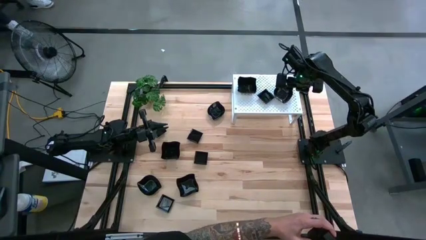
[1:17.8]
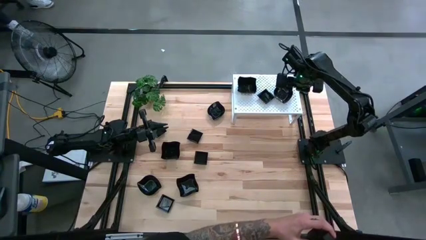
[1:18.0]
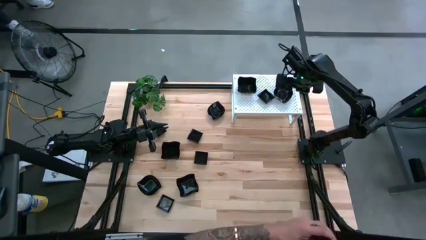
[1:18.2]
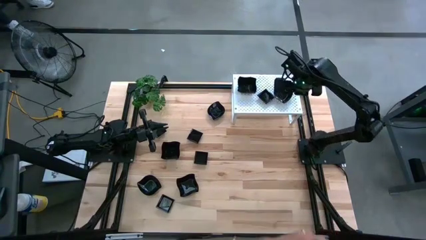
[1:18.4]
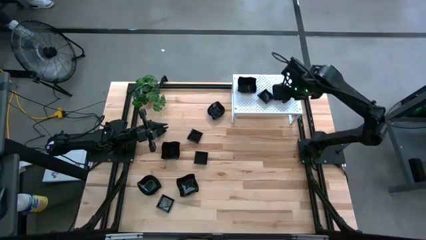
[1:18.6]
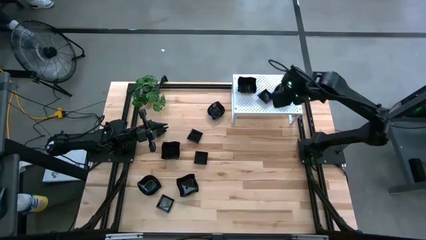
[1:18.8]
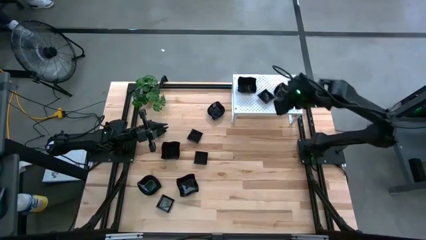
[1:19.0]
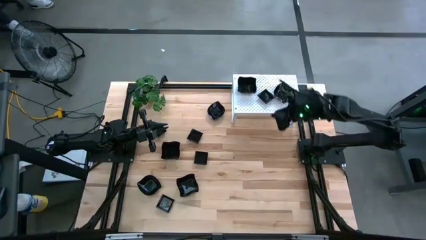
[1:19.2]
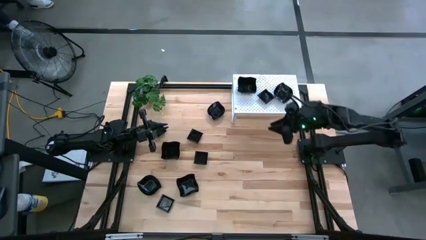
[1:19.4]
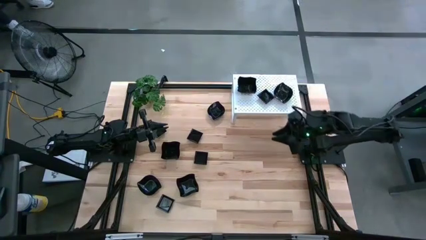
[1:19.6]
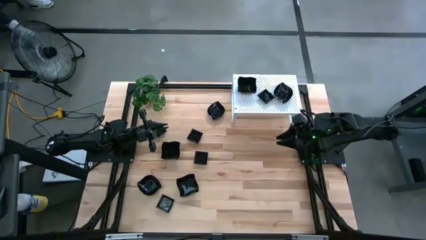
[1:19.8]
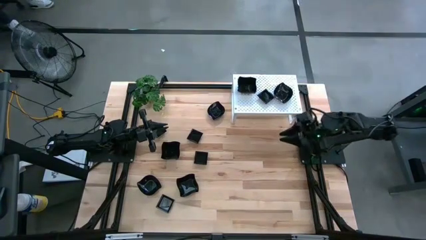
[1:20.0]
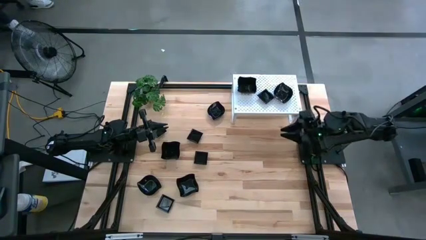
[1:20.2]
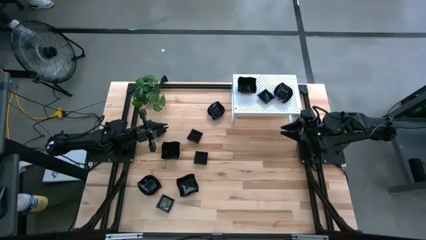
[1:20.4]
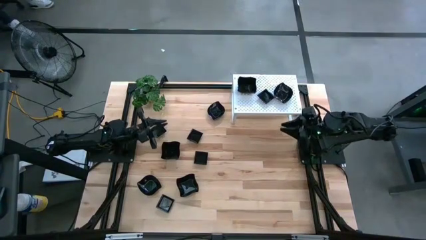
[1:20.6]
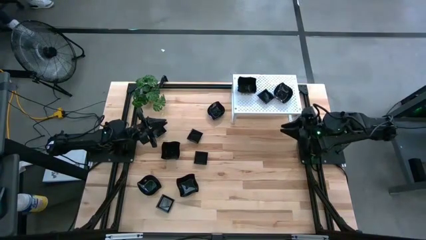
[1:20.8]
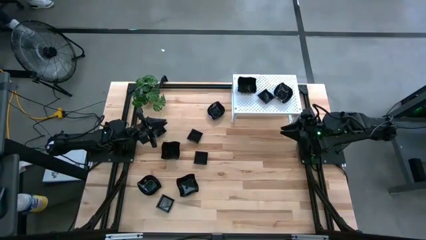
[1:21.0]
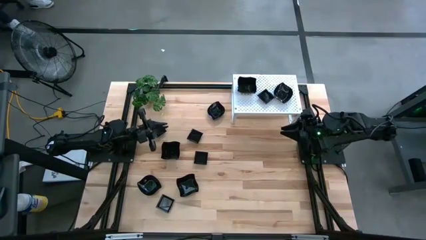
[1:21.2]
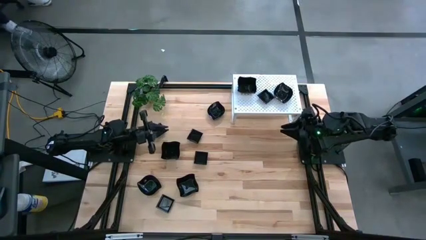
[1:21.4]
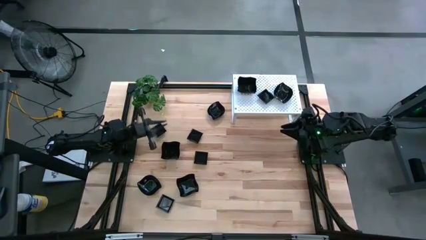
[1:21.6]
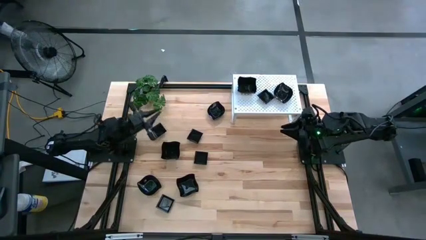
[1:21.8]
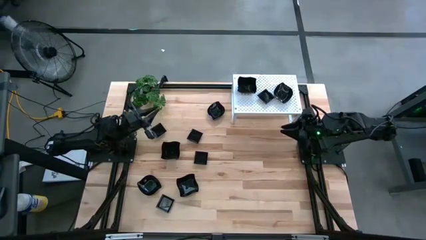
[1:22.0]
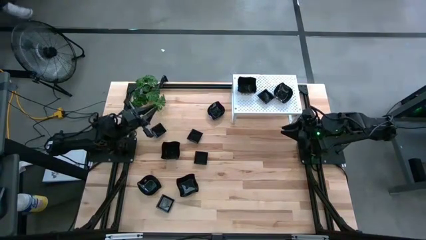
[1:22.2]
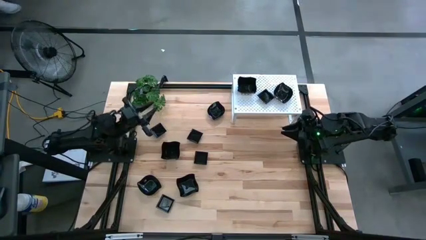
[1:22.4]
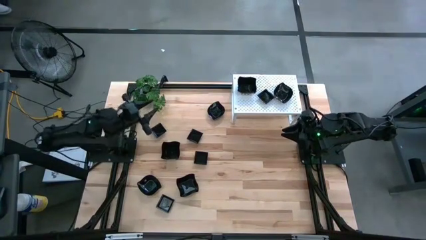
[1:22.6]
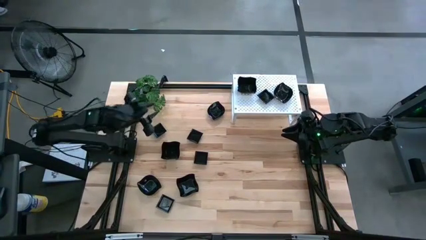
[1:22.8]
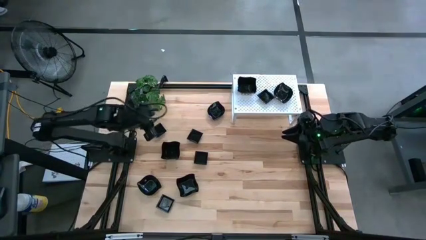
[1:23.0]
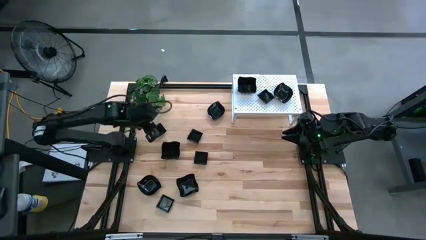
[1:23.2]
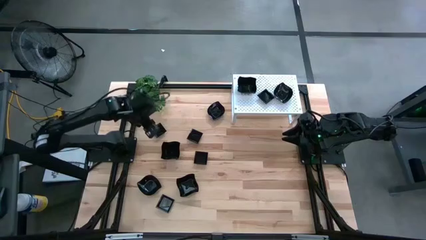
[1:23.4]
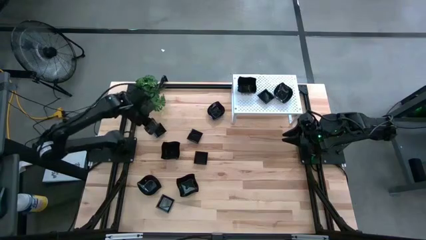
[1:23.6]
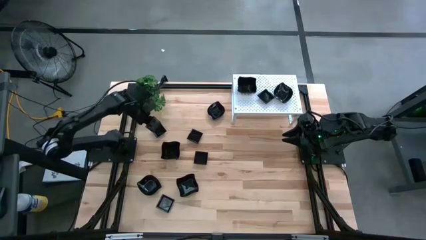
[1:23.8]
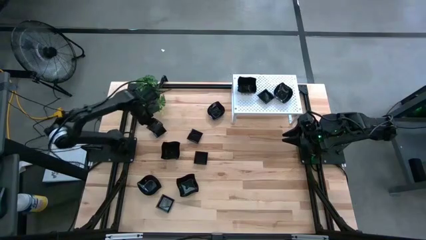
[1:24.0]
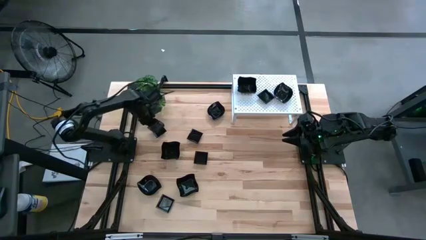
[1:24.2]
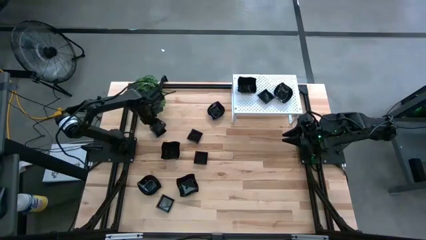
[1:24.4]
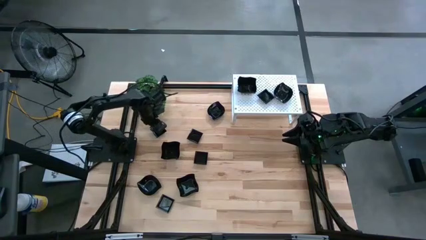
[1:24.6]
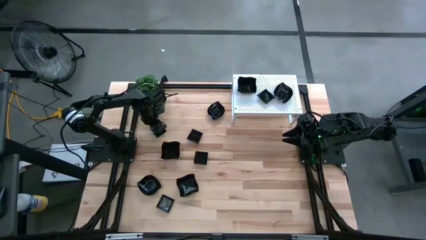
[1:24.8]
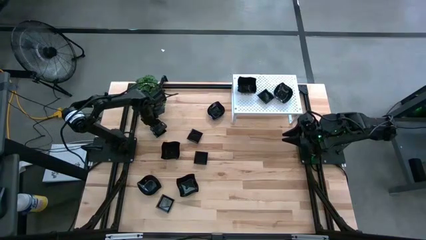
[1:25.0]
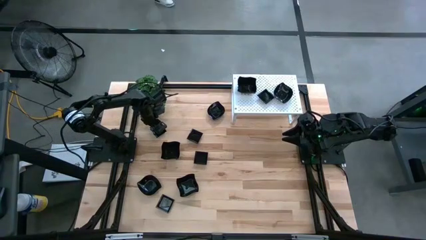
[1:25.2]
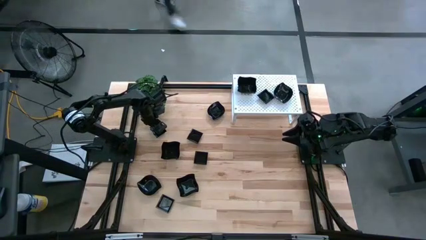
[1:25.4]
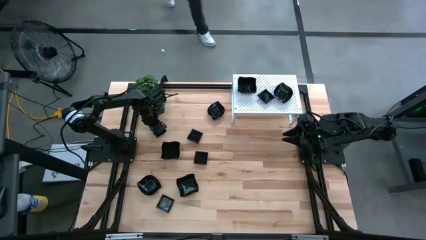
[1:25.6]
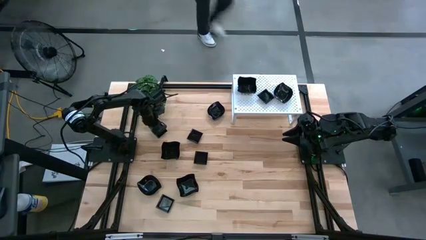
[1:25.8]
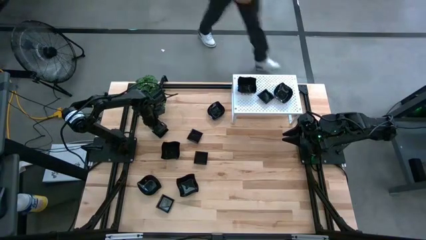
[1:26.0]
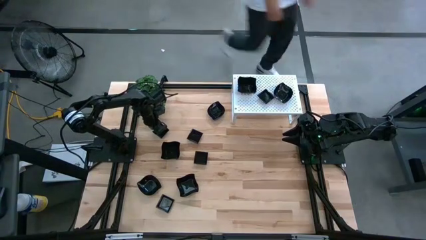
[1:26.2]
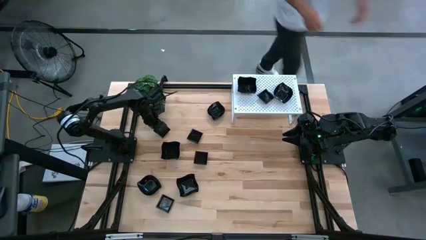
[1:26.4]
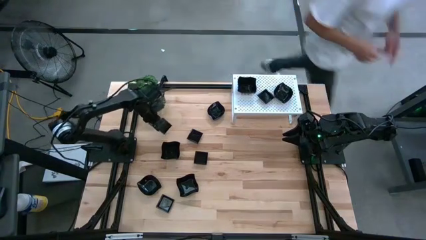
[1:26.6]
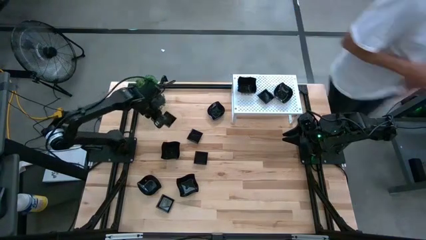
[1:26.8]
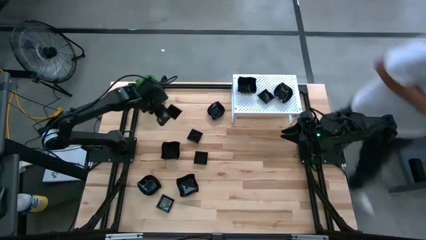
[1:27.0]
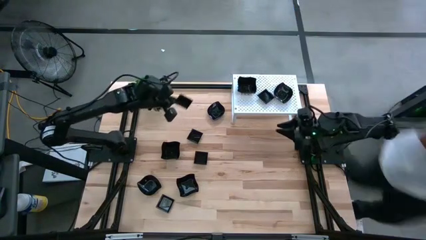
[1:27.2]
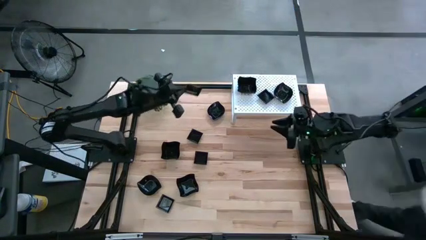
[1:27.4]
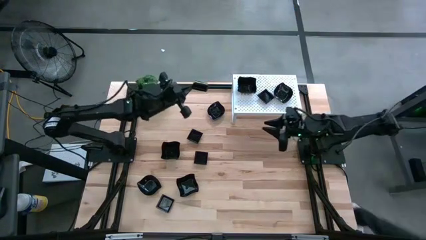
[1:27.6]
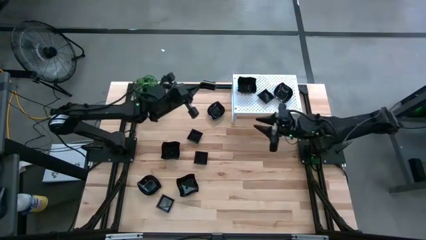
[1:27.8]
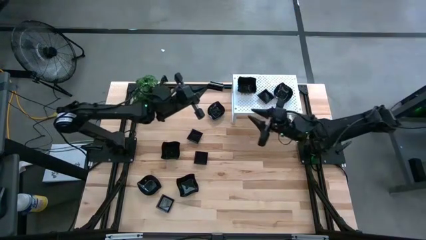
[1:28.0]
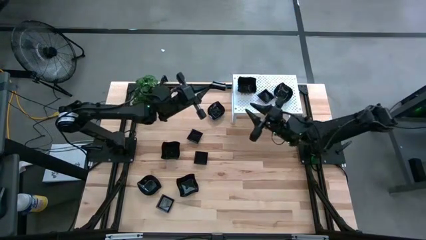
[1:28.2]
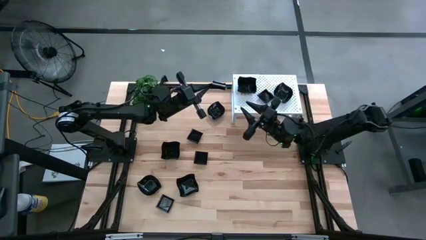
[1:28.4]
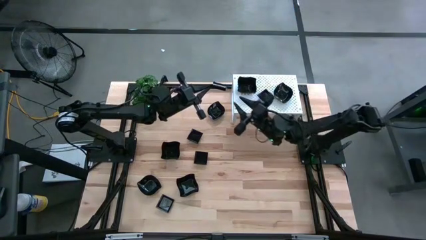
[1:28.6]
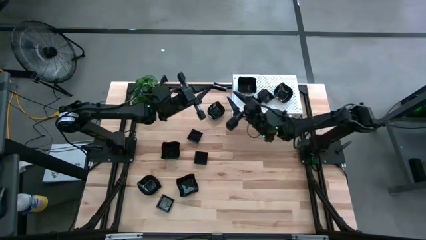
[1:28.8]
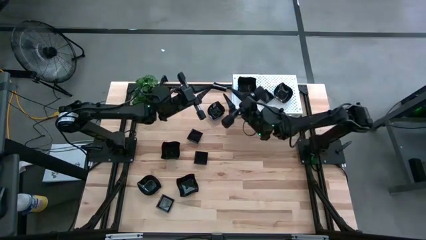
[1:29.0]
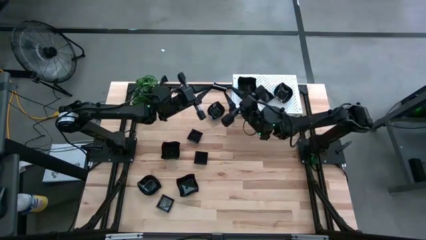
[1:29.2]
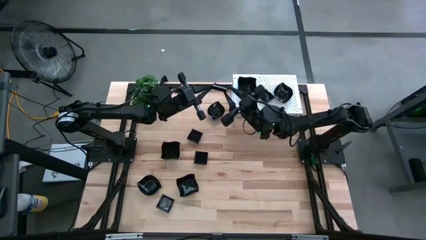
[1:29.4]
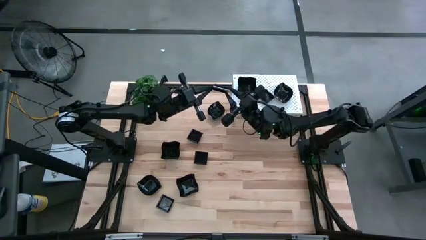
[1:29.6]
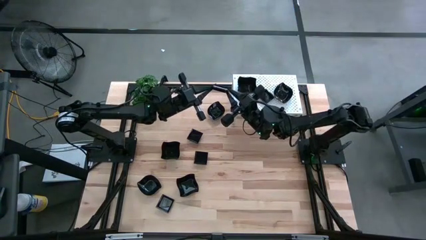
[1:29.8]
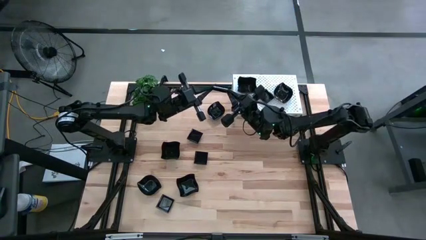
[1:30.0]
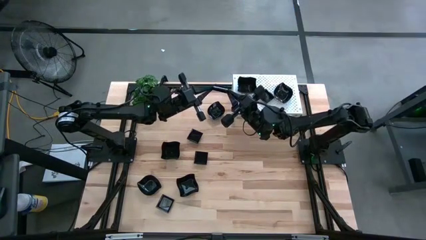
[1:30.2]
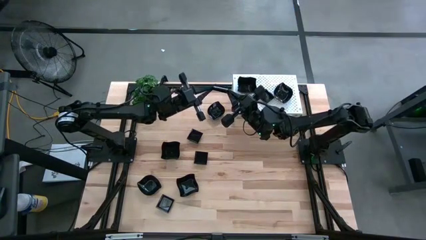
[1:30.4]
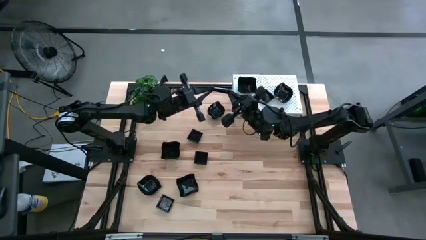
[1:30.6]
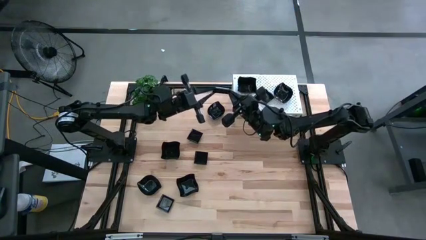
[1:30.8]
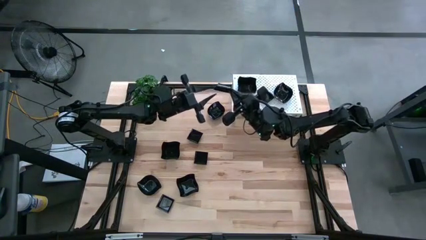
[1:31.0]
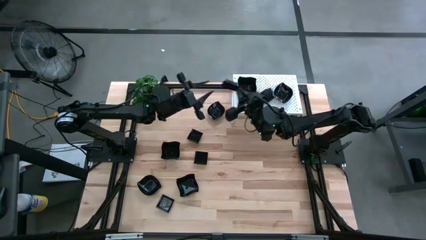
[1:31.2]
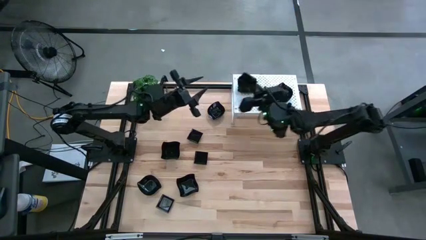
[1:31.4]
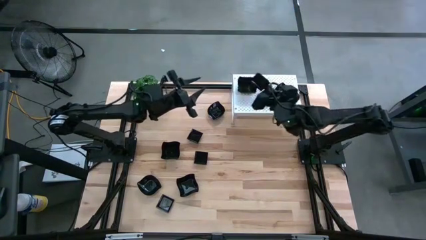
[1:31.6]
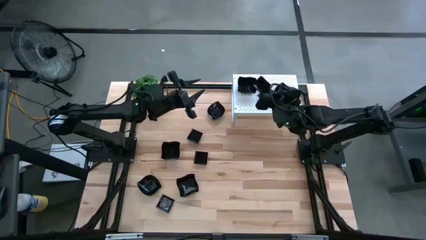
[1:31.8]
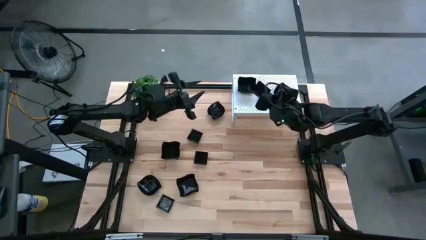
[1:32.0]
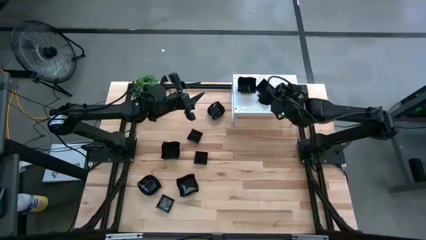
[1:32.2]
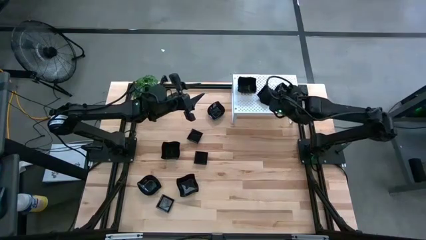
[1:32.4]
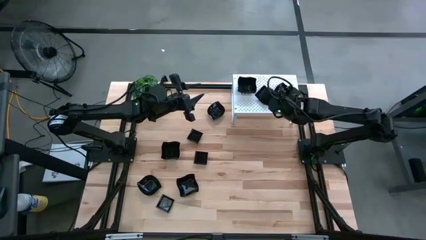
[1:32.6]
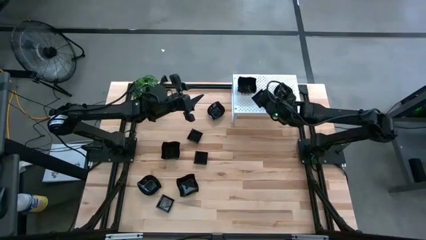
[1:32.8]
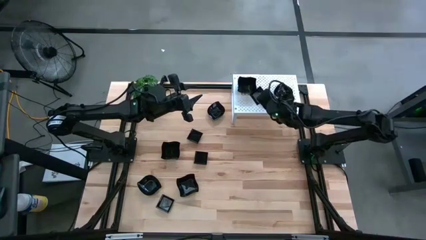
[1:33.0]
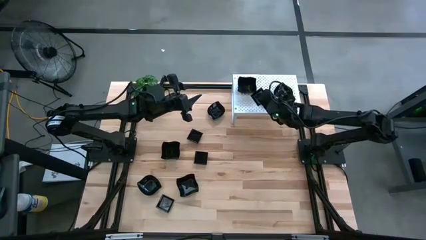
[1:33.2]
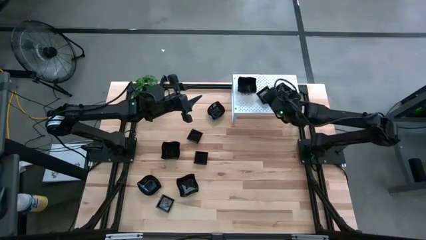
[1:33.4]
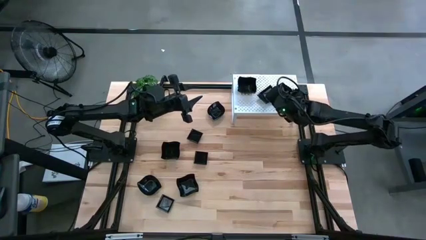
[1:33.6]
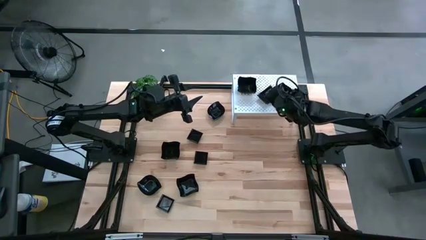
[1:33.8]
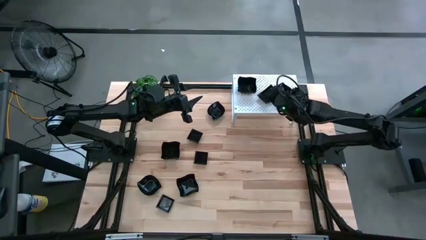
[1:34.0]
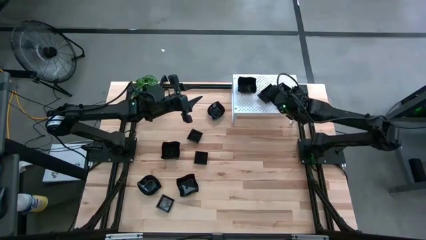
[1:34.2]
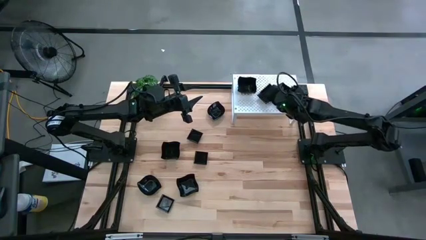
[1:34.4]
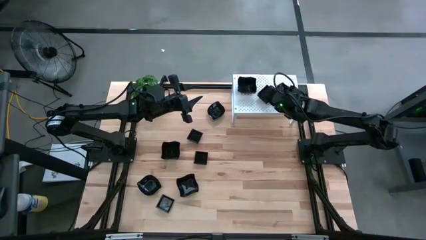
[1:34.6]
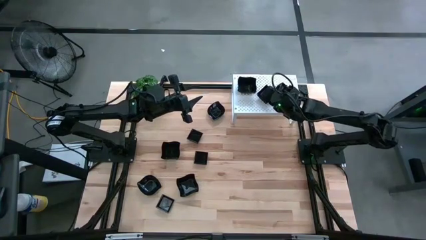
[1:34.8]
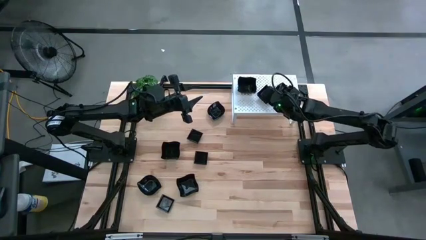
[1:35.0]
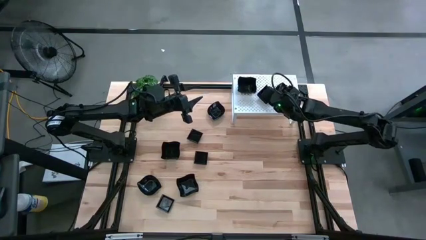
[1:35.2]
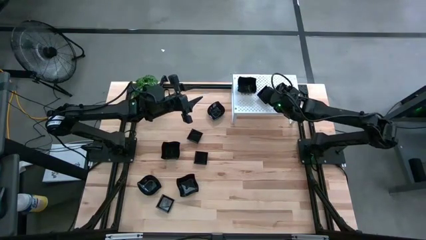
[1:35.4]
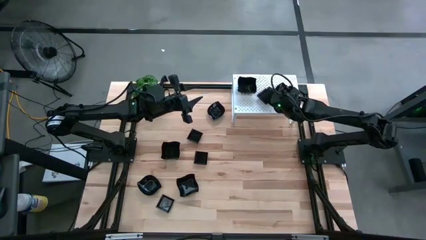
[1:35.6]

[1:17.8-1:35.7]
Task: Pick & Place Mini shaped plates
Stack the square plate on top of the square plate on the shelf
